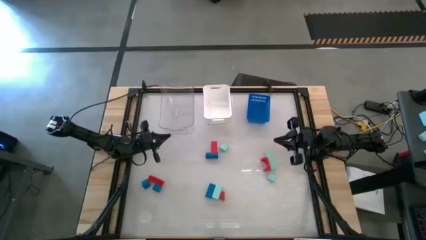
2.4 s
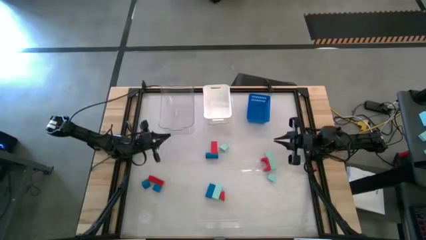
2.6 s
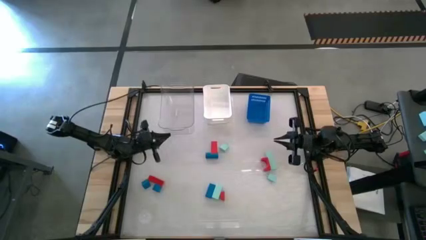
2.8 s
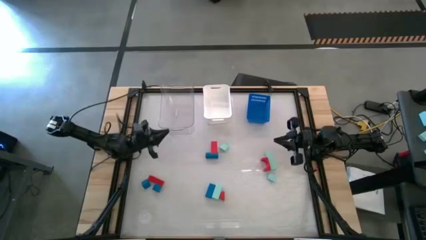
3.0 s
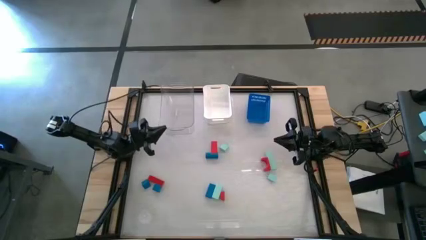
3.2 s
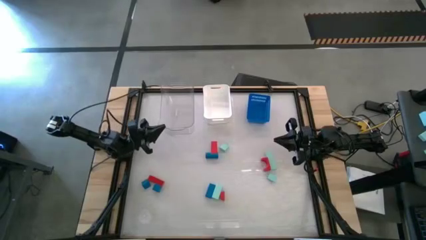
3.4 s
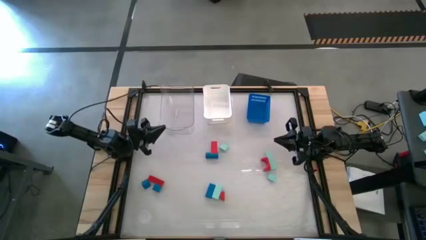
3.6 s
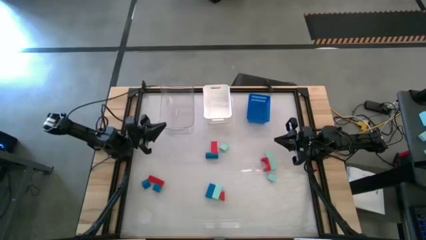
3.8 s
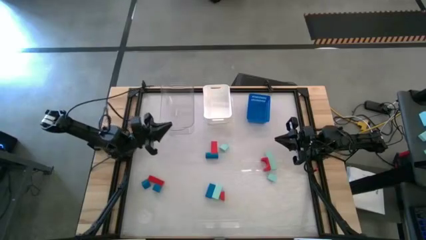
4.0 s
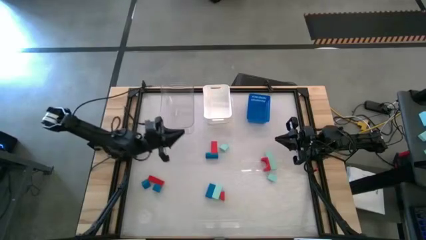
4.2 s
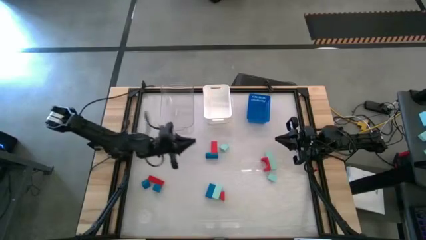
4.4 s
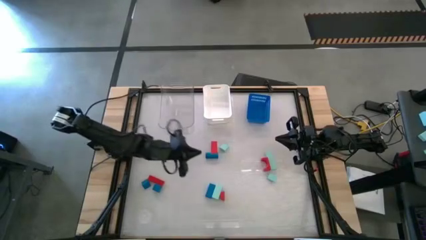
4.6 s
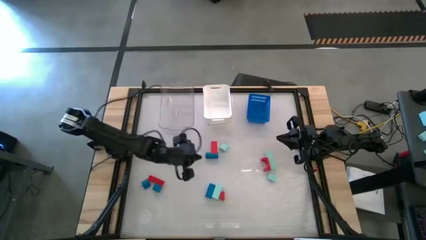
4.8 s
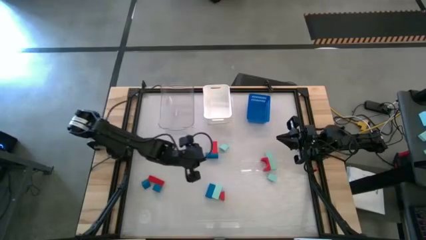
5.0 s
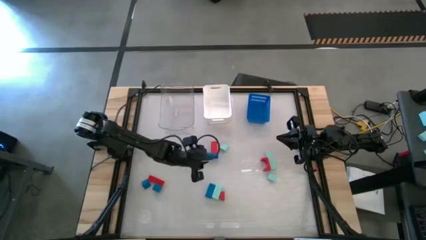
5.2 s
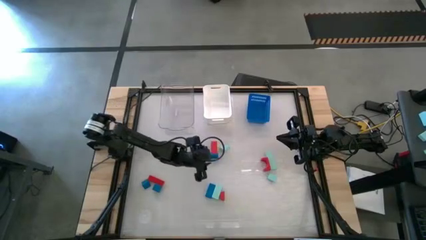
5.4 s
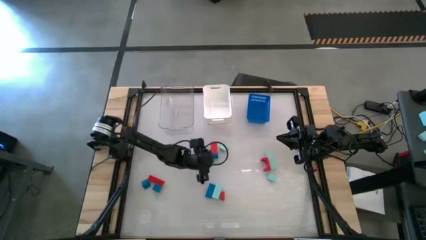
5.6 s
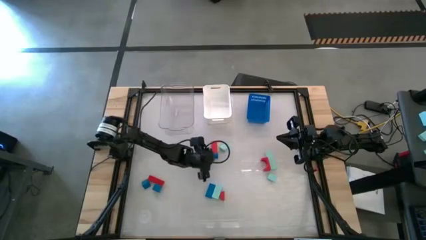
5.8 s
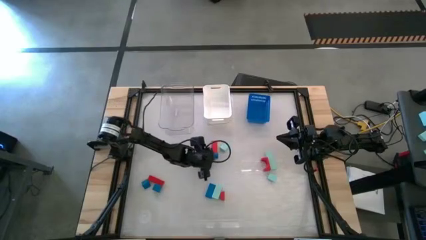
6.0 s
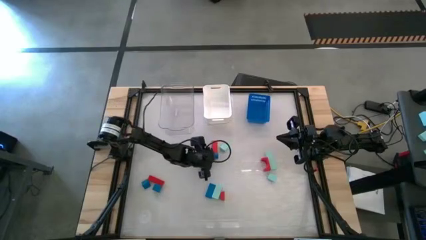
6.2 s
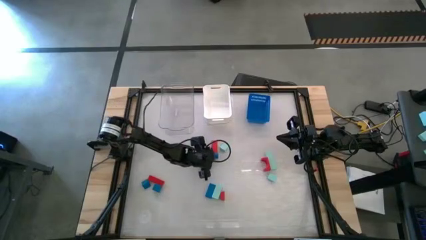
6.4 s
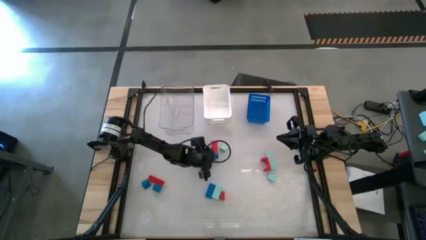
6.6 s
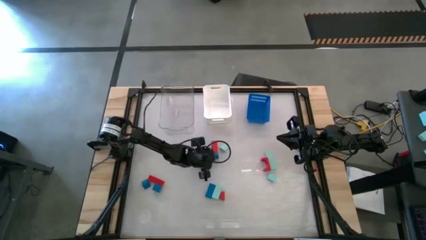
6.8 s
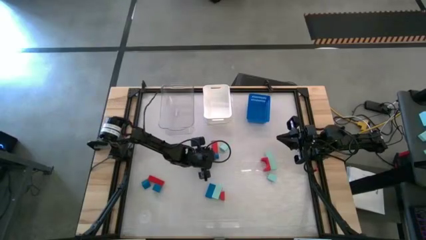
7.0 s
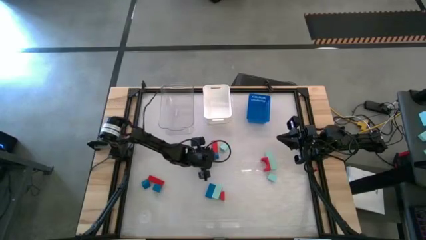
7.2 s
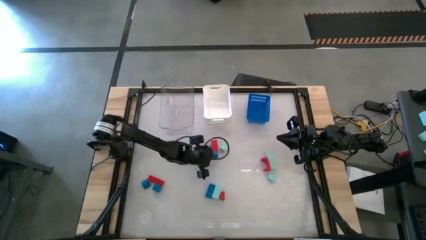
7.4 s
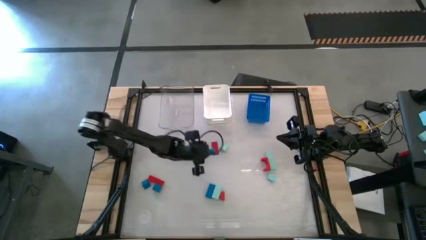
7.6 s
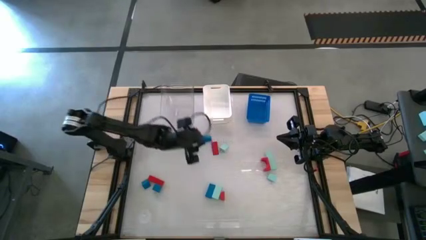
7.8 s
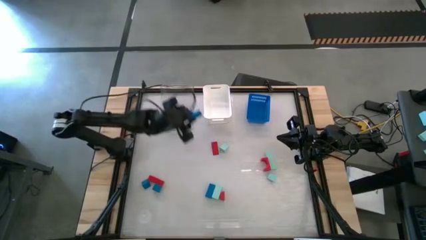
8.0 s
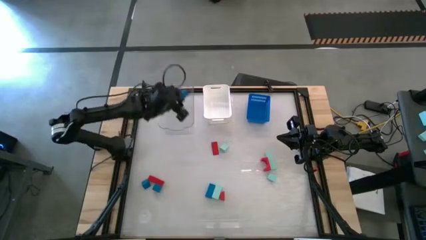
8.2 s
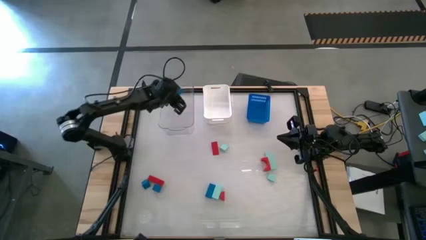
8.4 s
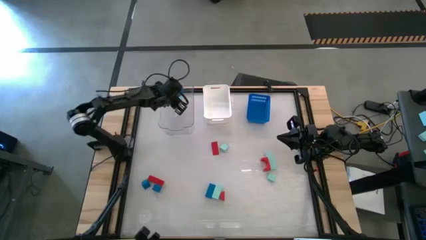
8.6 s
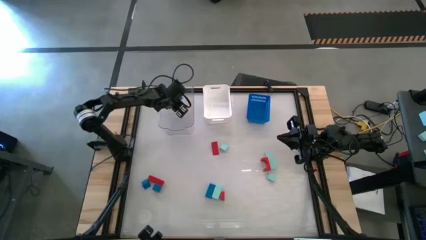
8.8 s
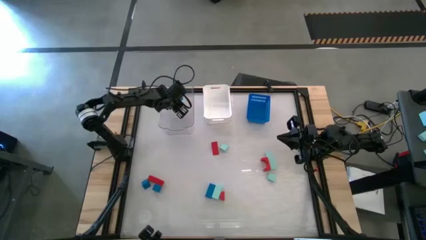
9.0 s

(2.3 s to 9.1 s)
Task: Sort & place blocks by color
Put the blue block into the transparent bin

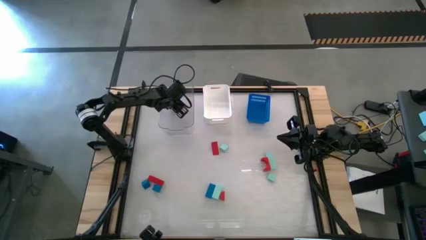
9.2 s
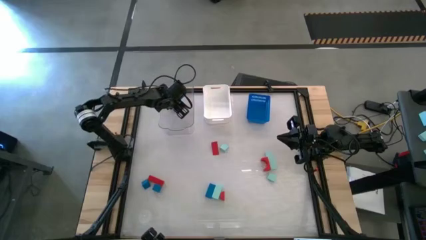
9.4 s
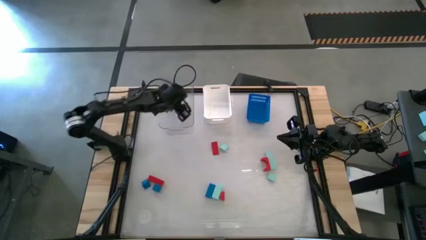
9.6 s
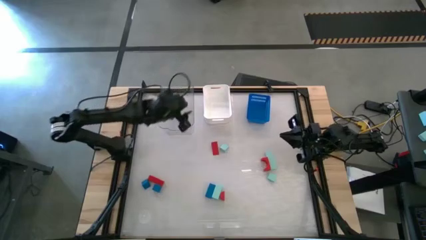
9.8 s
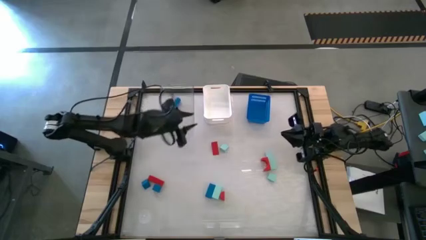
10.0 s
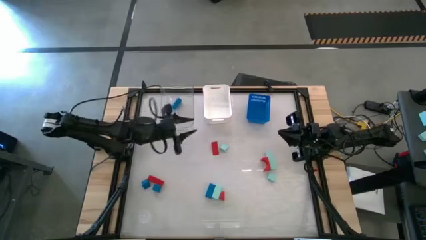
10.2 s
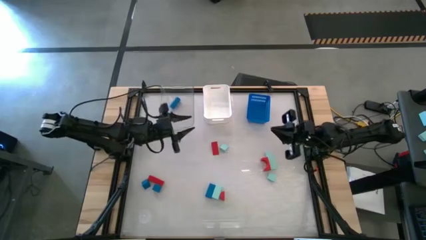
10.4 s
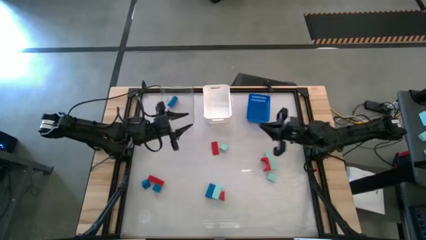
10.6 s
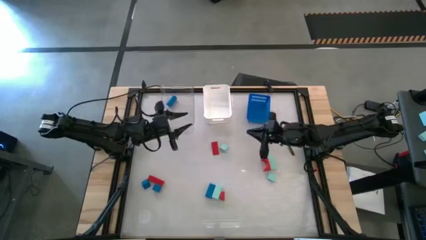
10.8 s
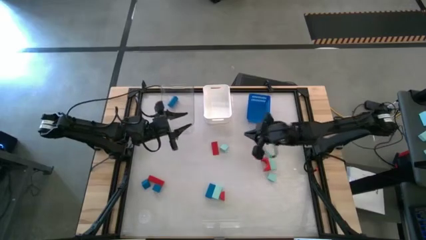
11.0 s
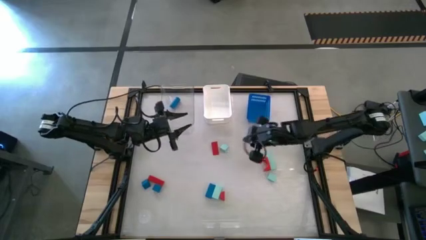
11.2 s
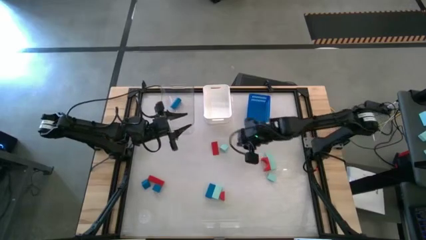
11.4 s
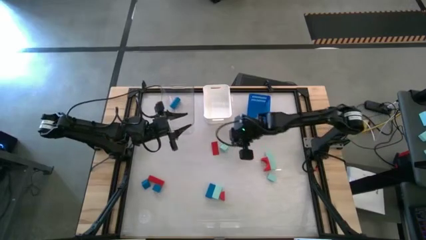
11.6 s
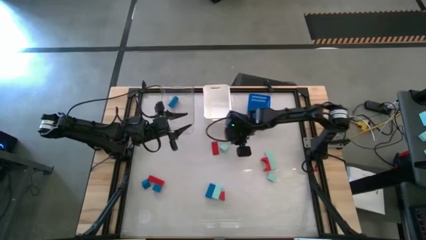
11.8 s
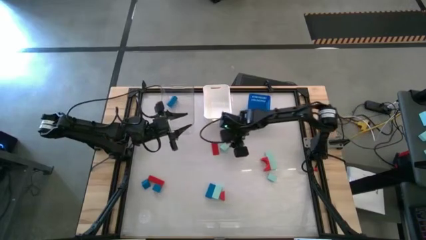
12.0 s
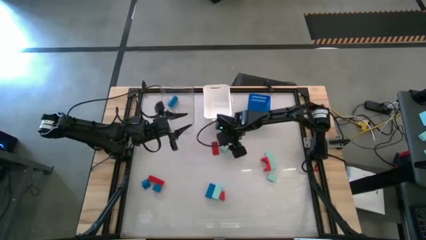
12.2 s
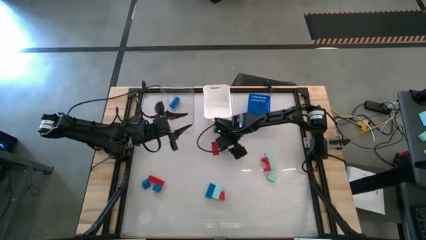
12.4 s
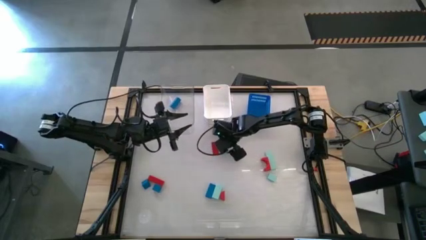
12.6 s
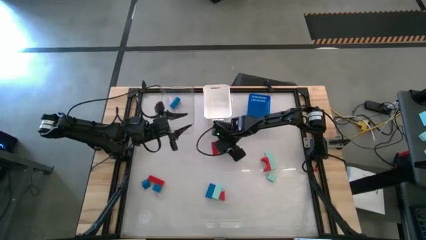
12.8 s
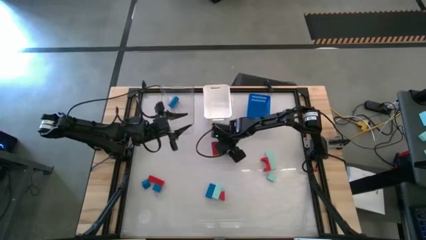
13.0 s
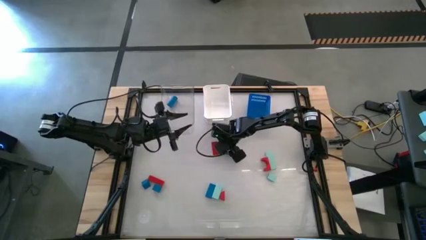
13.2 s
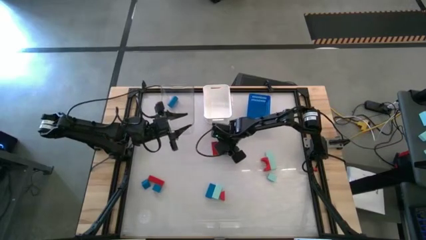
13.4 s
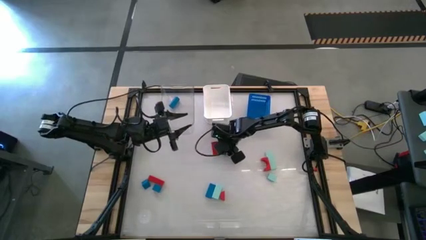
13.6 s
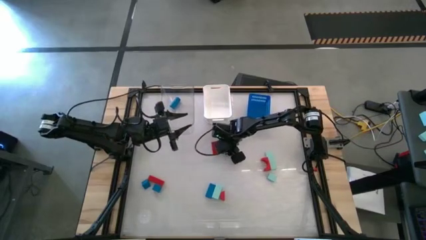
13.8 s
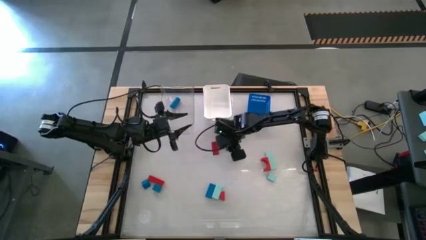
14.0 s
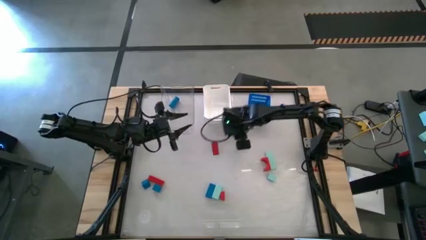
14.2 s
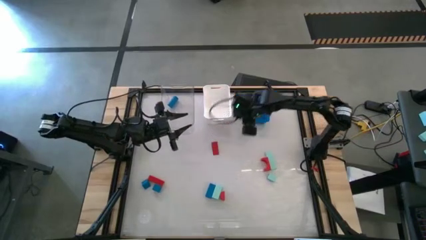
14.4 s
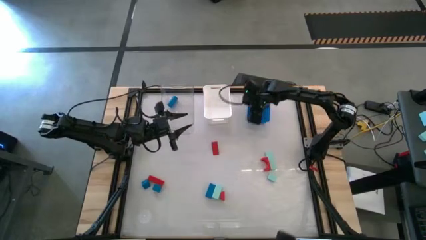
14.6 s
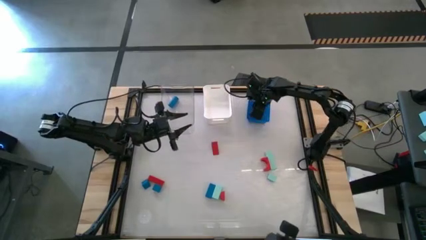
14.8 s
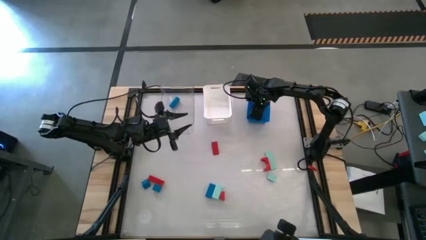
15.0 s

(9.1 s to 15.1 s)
Put the top light blue block into the blue bin

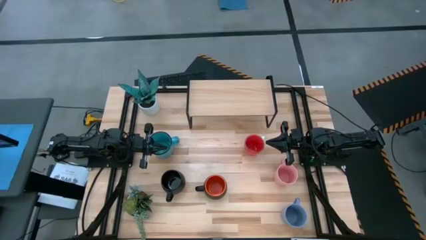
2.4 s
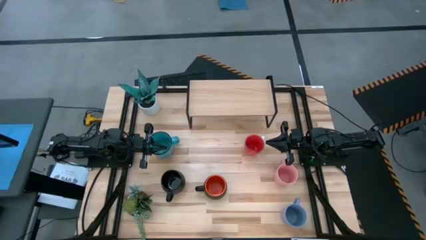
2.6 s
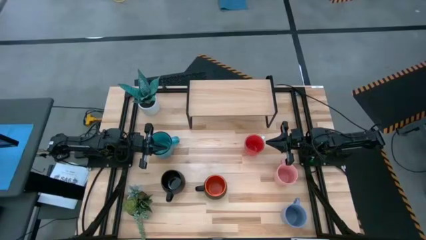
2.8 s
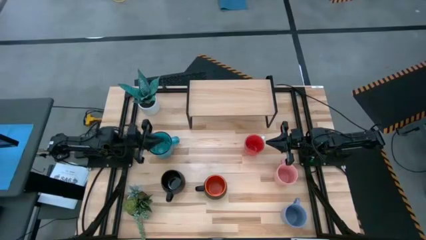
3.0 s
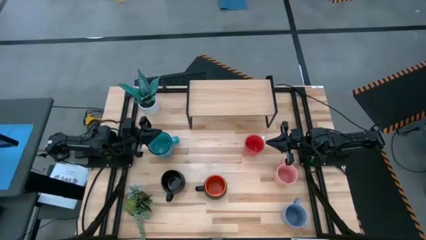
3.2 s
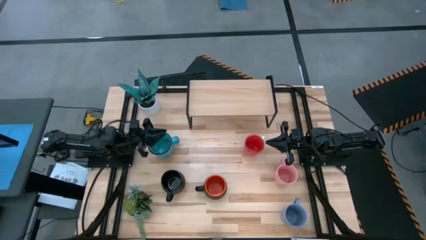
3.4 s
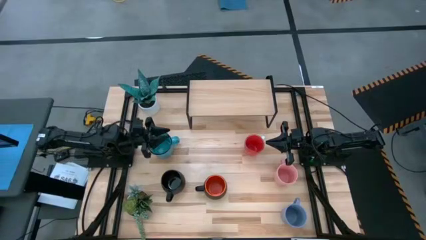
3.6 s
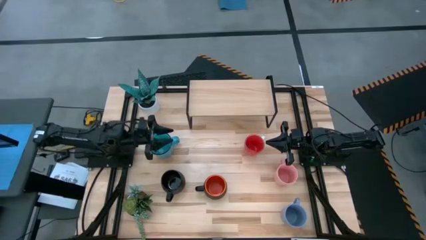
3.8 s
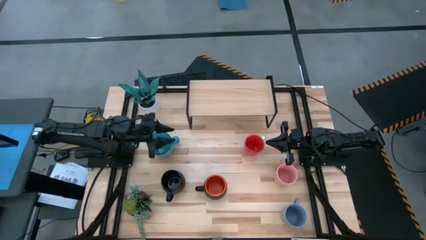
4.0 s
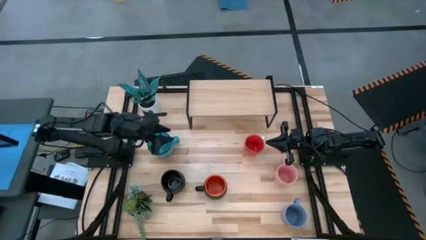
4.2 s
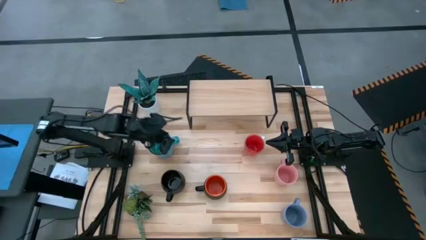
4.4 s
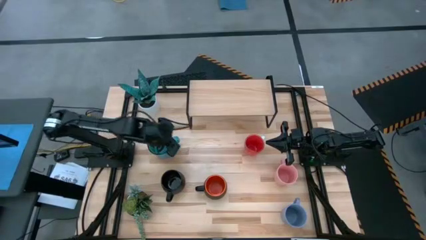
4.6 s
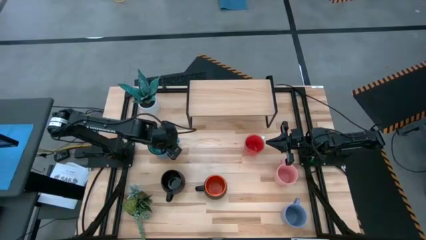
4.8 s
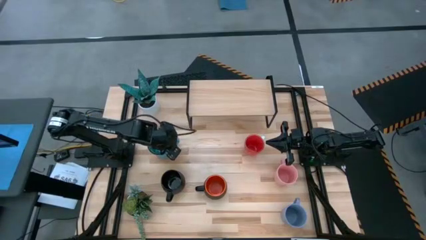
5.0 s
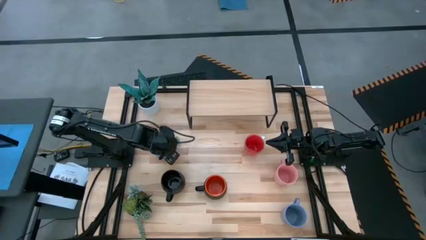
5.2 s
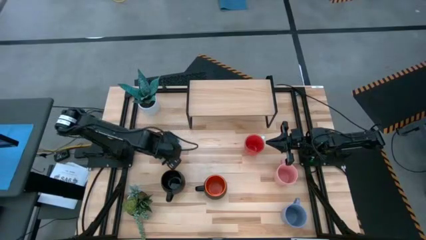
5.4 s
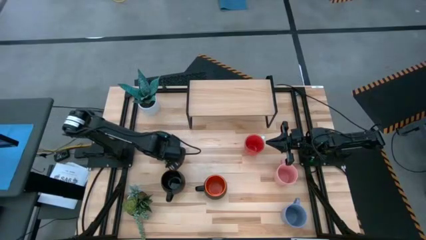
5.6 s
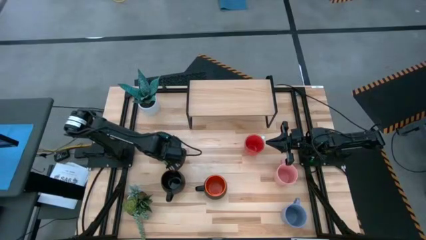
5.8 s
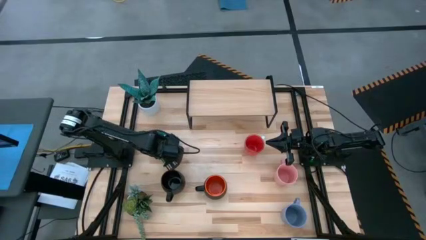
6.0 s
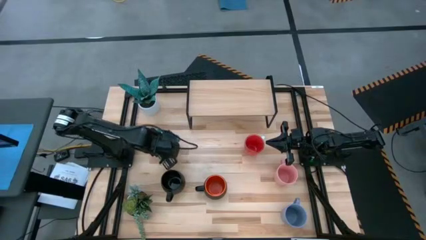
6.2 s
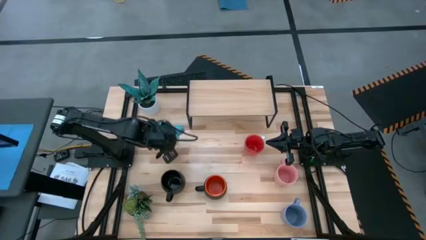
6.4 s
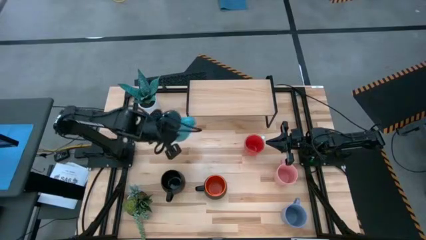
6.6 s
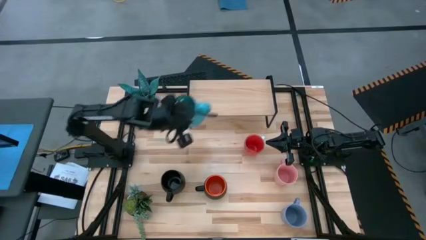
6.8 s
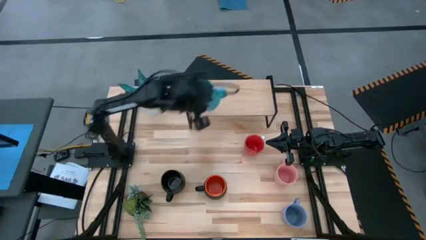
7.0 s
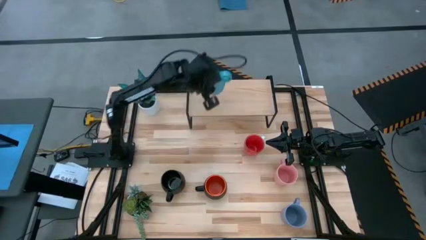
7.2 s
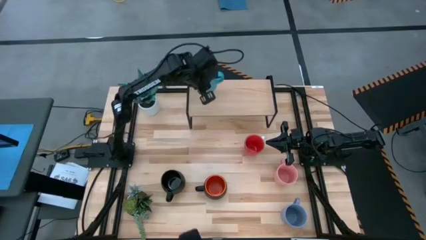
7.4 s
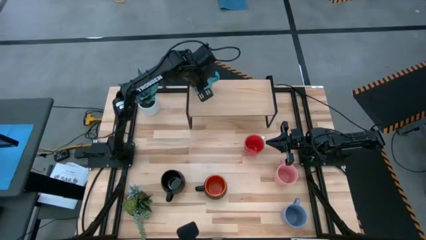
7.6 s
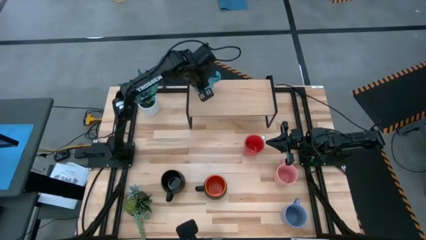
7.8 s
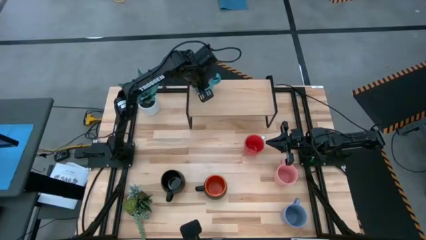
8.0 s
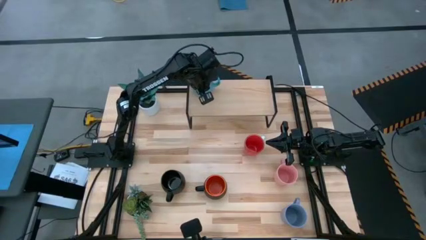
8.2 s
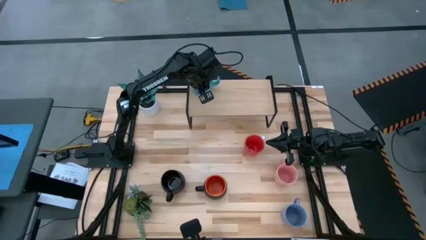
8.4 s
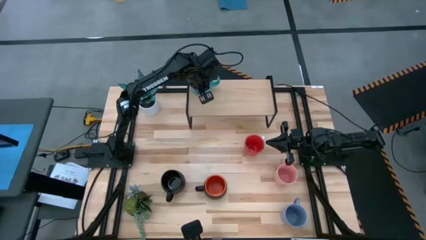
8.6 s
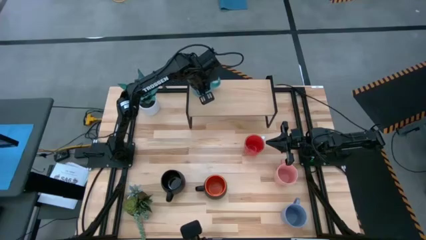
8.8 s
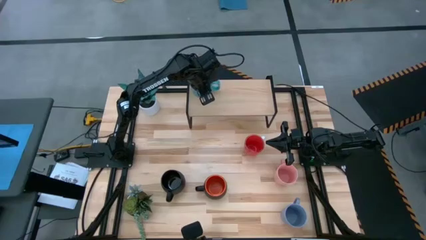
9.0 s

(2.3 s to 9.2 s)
Task: Place coffee mugs
Put the blue mug on the shelf
